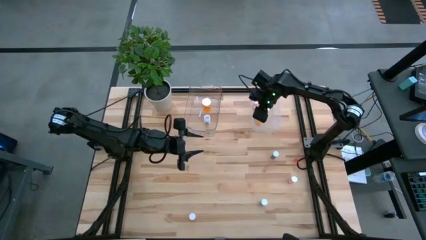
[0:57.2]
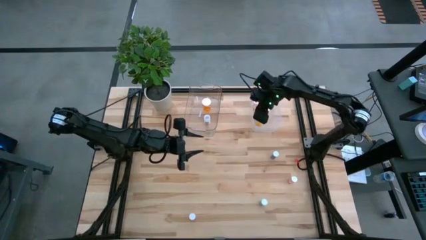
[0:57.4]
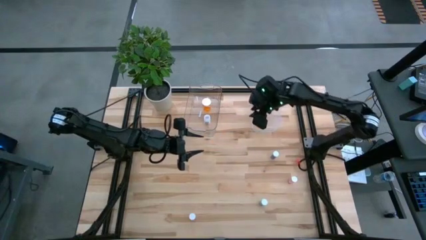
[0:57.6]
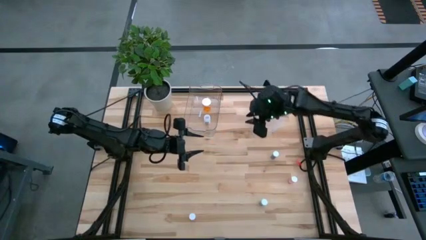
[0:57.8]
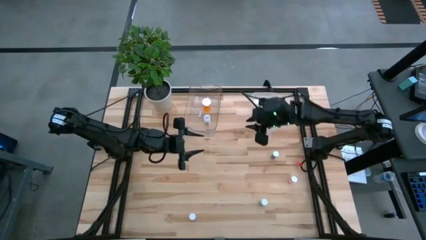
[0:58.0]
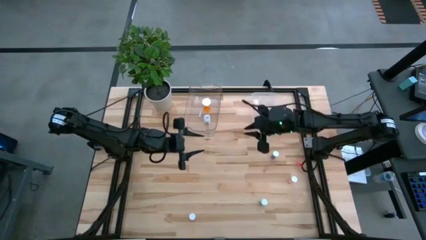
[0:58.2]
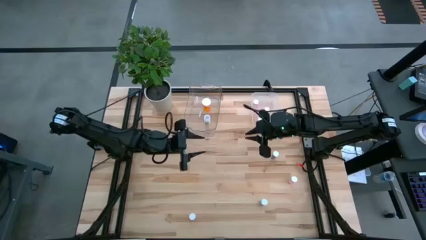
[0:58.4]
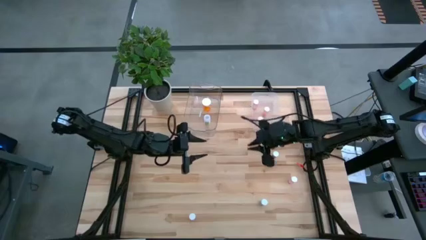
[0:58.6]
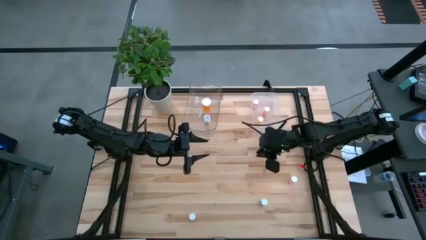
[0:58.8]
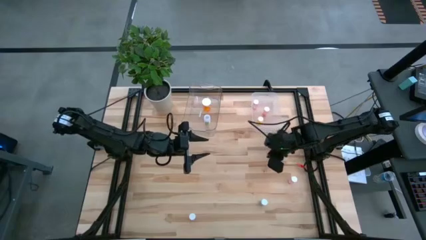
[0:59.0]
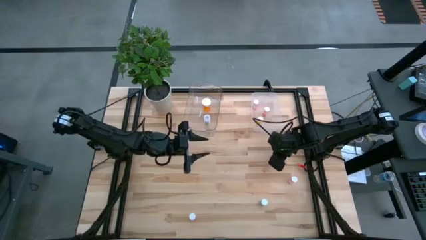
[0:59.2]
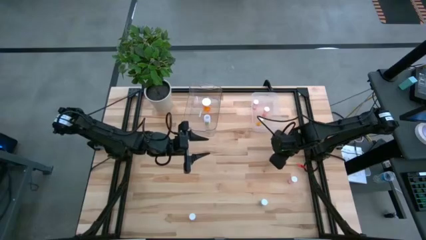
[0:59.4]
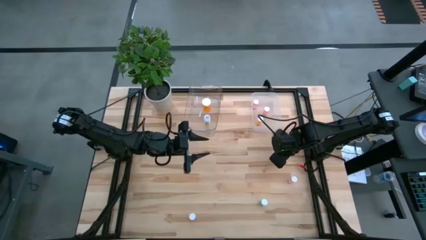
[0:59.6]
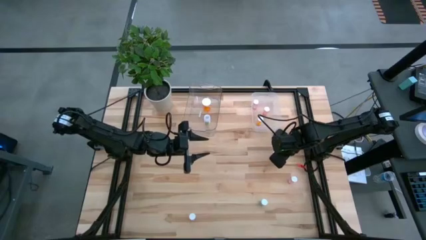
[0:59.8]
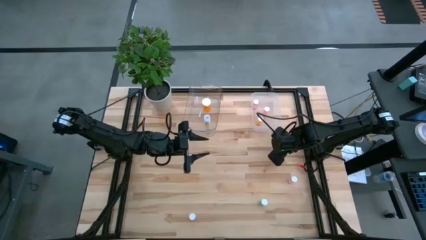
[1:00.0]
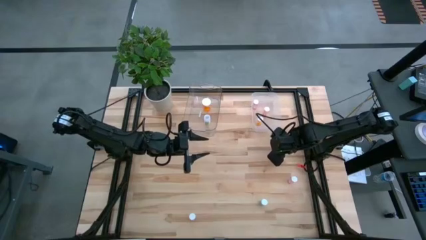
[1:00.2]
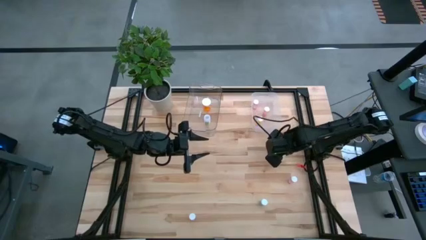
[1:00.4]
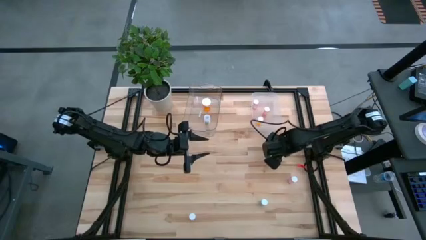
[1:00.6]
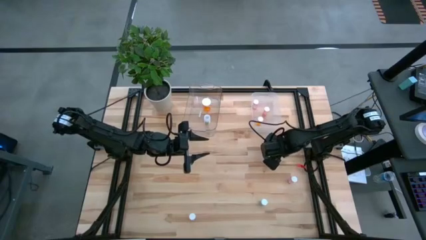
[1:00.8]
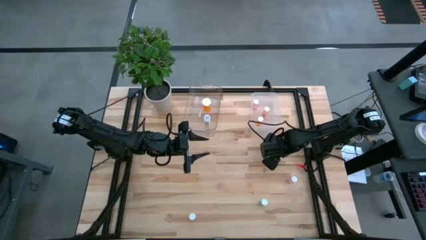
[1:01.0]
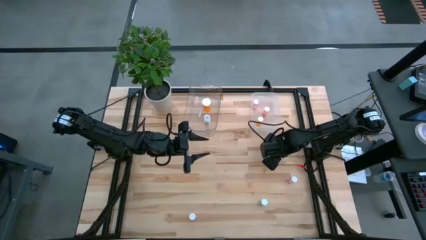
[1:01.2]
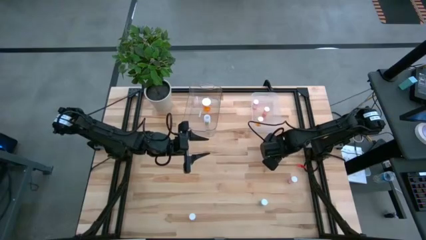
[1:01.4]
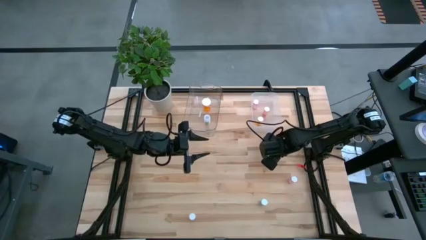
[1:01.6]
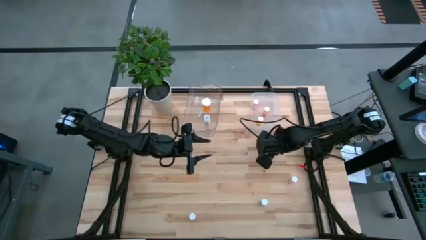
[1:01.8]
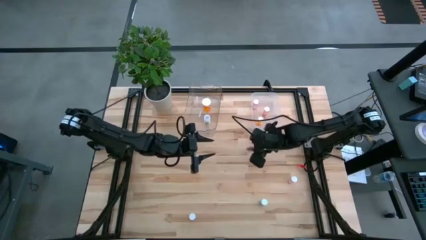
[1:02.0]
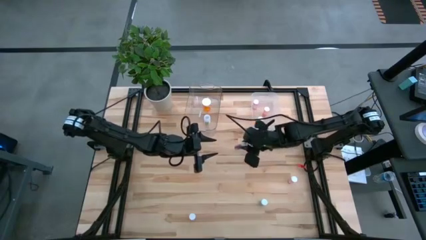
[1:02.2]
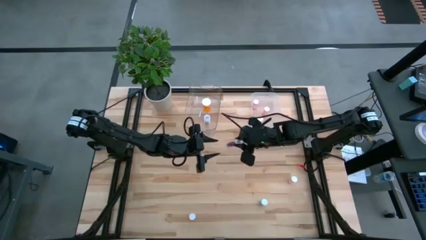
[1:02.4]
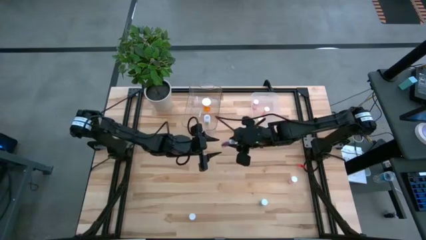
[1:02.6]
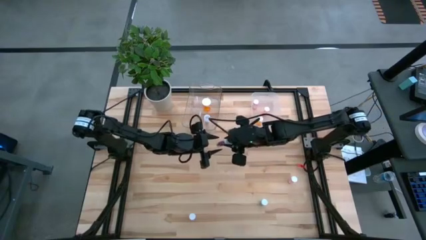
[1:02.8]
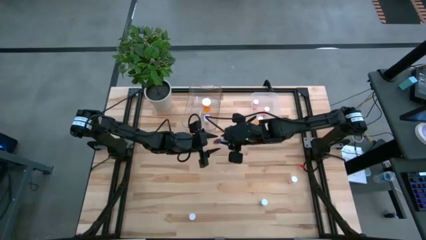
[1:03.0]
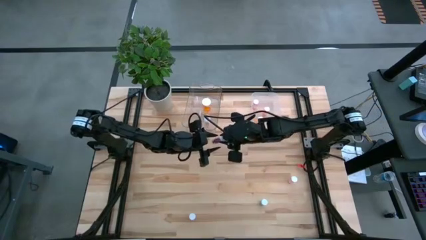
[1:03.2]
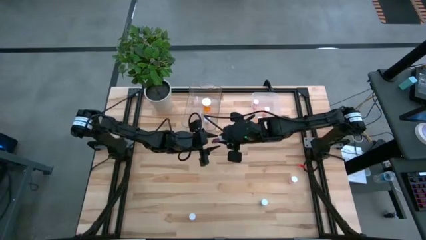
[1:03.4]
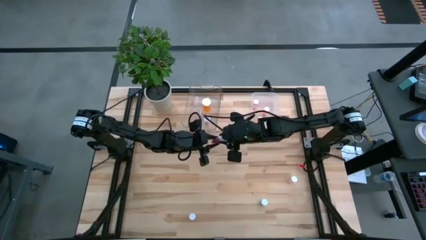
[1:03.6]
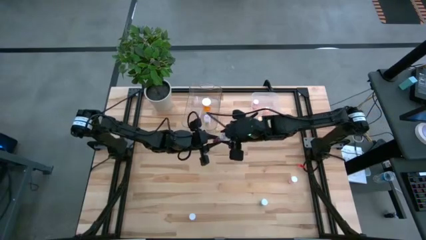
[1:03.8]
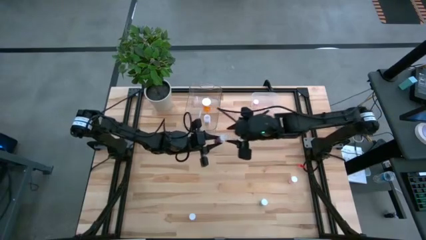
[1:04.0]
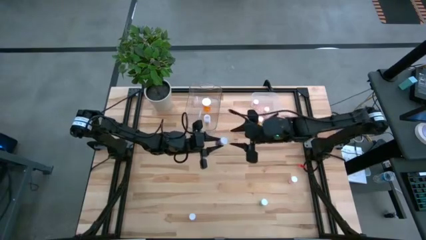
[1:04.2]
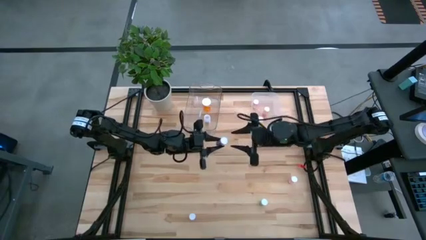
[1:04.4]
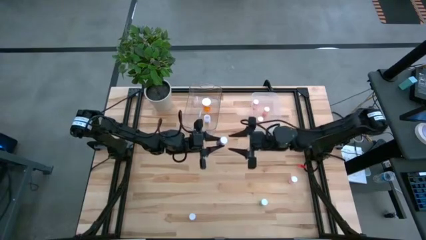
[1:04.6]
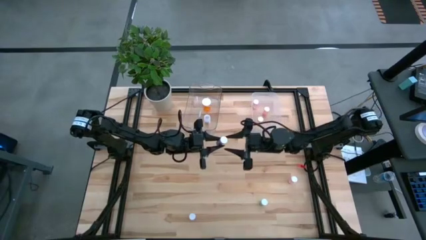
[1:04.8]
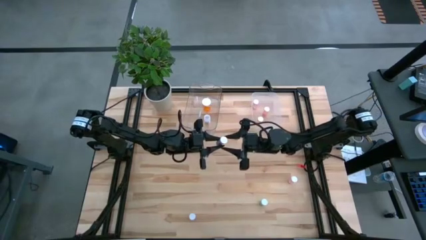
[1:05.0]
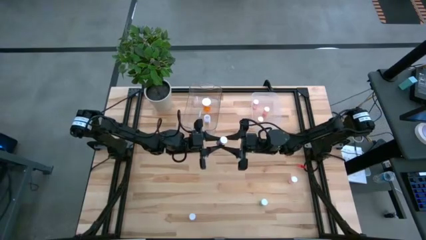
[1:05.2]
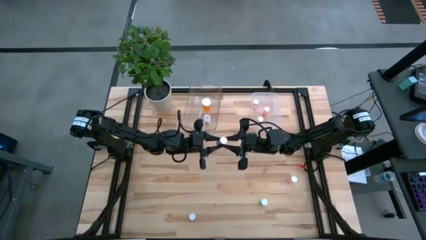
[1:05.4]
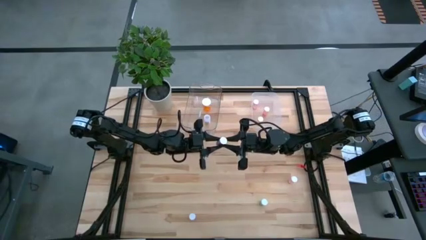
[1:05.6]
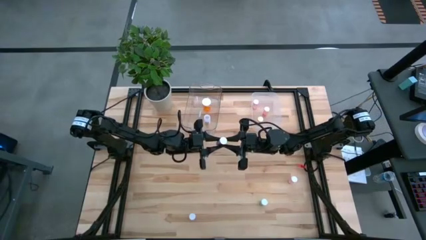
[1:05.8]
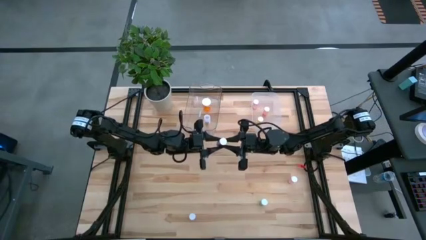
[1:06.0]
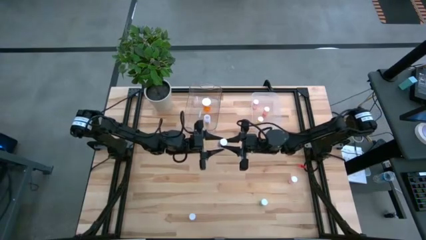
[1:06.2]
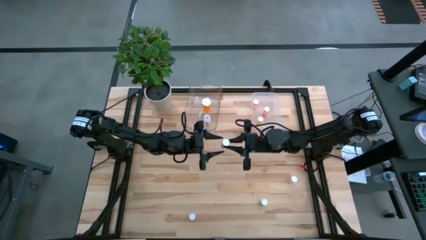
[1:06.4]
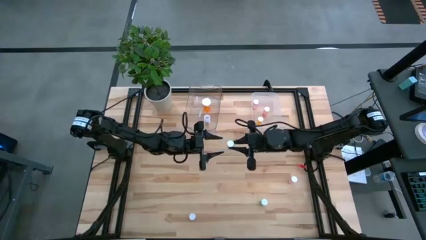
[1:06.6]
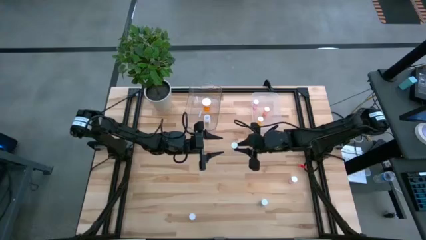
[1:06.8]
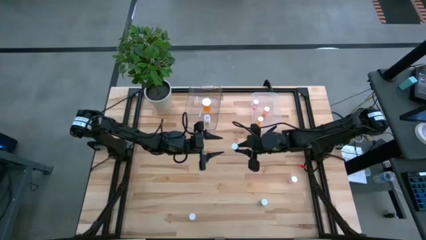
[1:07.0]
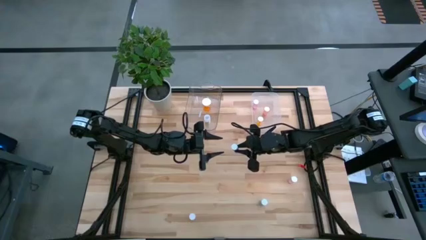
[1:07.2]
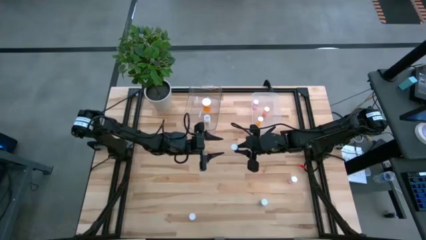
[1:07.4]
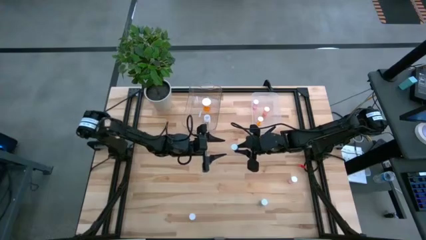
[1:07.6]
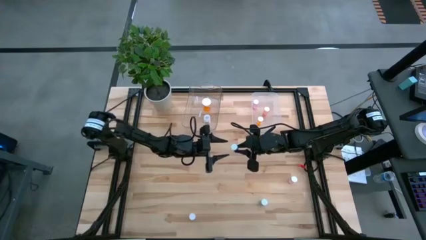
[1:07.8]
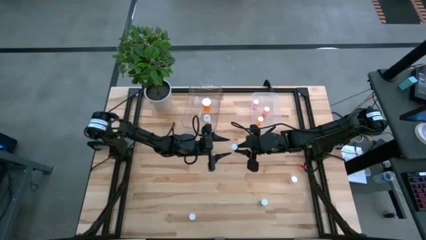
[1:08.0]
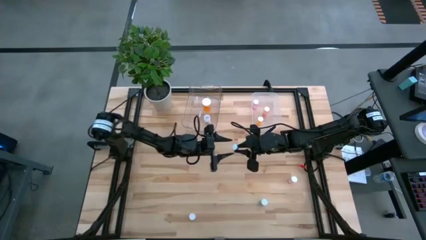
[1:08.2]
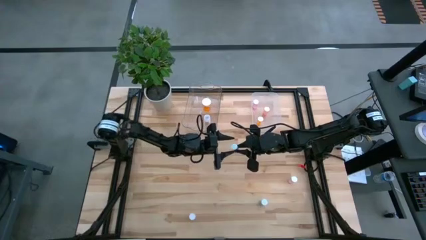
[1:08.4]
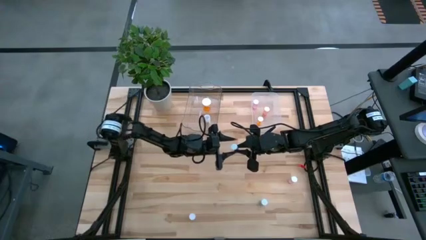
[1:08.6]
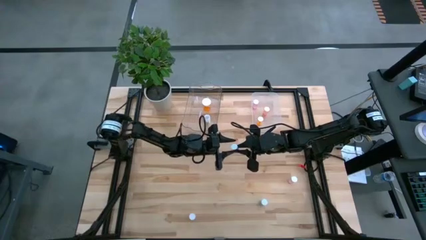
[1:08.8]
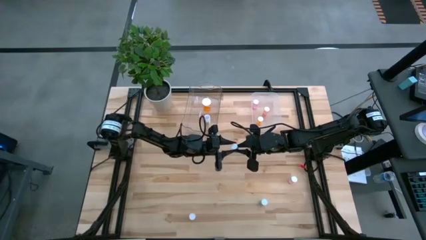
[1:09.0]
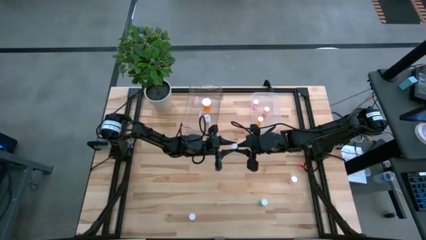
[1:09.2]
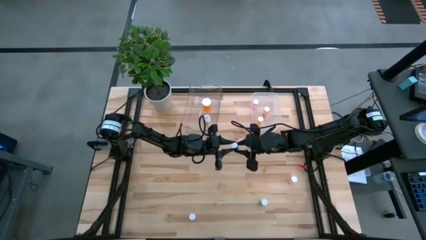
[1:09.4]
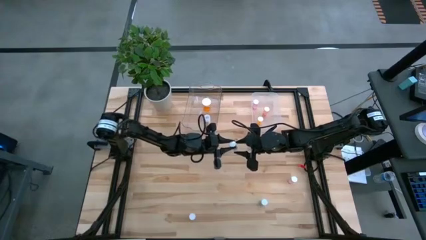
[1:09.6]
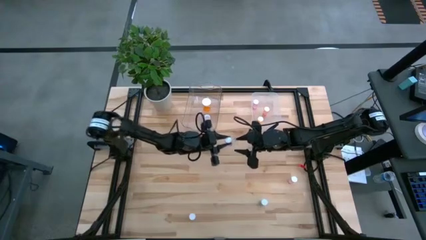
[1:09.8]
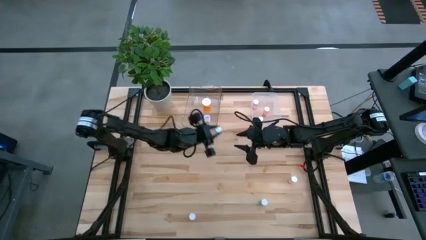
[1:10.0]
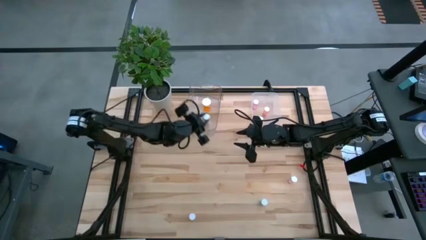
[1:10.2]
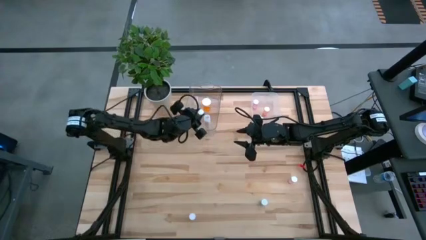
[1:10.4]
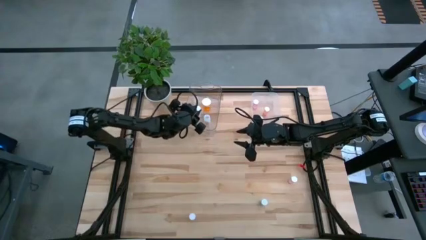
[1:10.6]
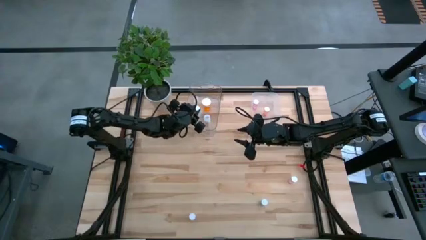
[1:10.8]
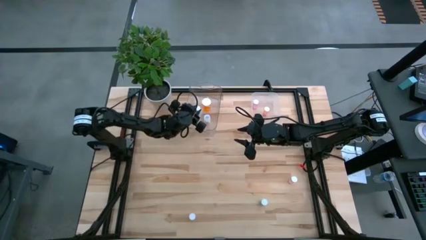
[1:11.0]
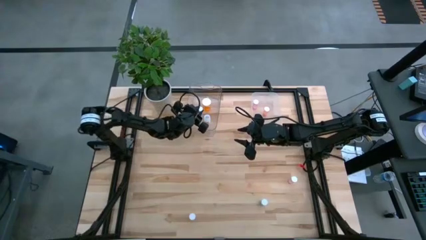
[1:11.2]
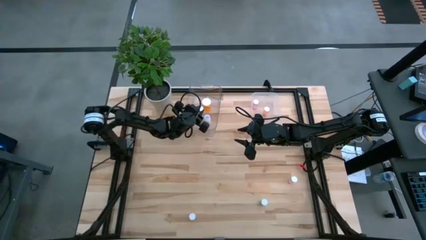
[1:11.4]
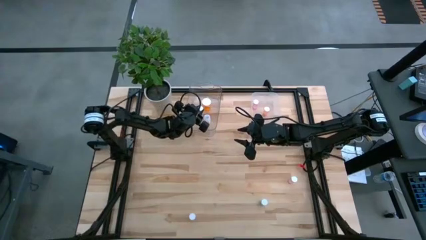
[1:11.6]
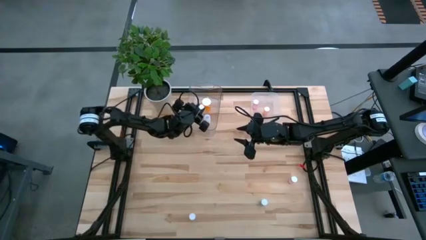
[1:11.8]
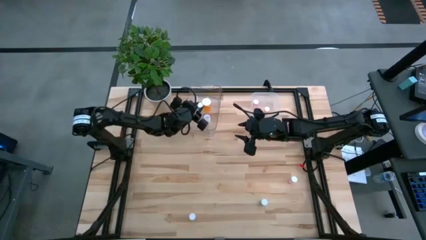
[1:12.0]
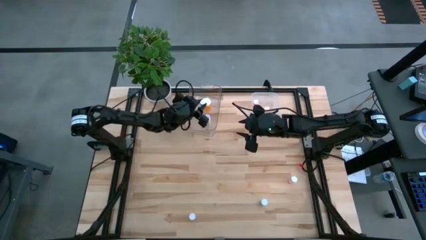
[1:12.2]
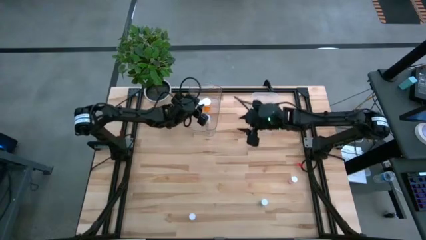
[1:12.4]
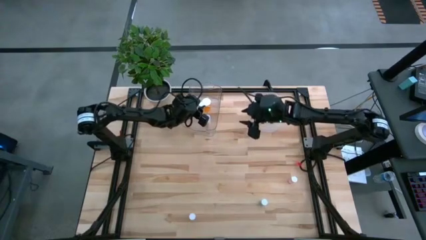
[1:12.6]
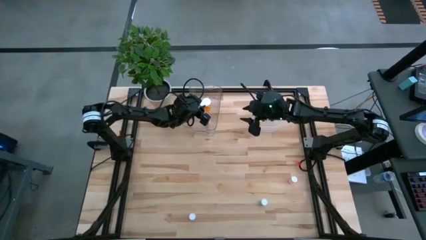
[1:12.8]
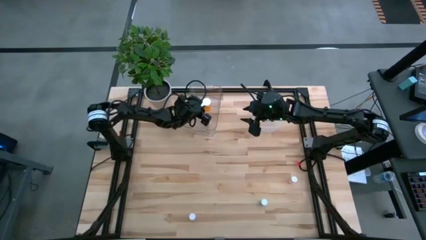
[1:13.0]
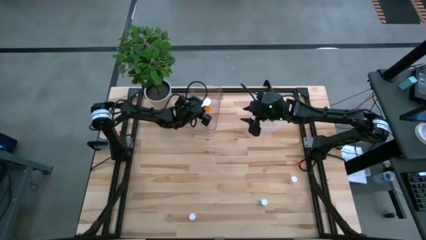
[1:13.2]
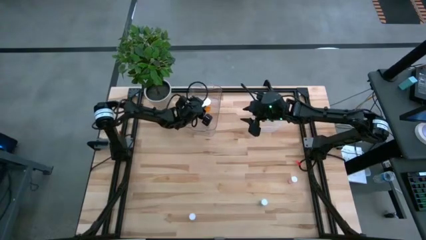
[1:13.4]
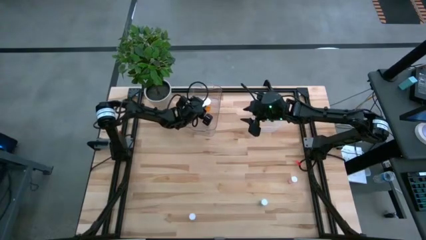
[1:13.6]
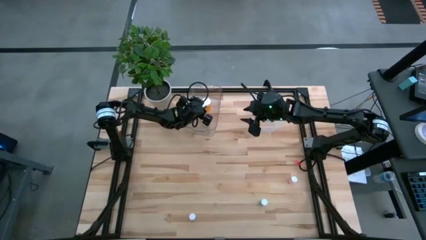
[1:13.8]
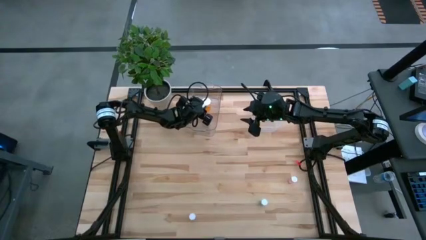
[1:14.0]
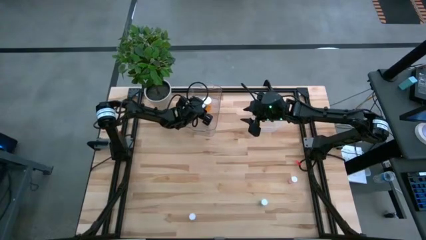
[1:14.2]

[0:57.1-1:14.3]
Task: Pick and place medicine bottles into bin by pill shape (circle, oval)
Put the blue capsule pill bottle into the left transparent bin
